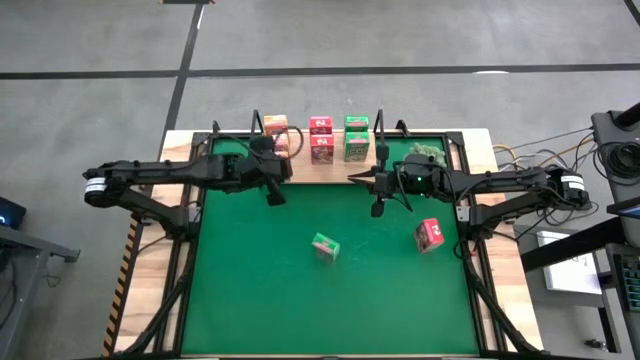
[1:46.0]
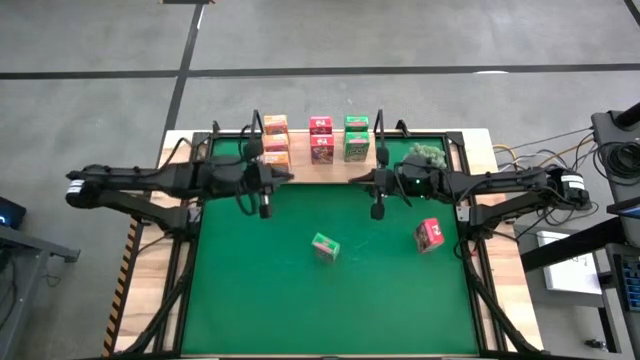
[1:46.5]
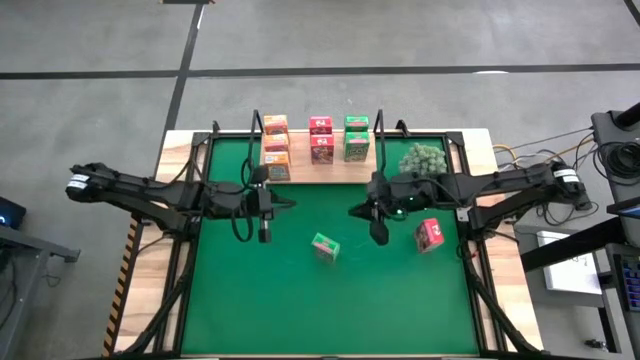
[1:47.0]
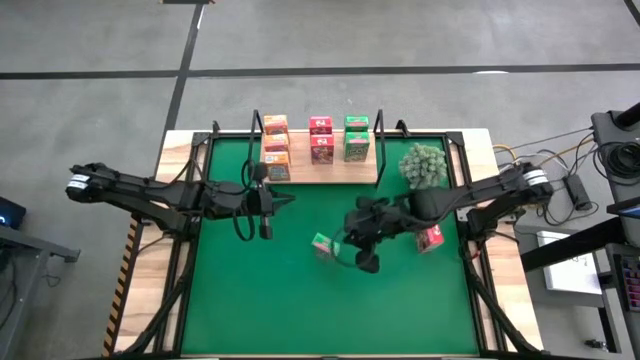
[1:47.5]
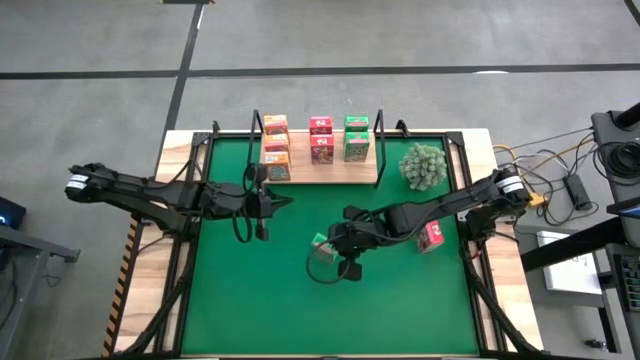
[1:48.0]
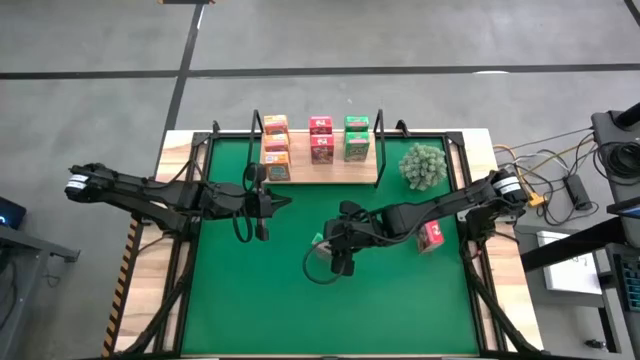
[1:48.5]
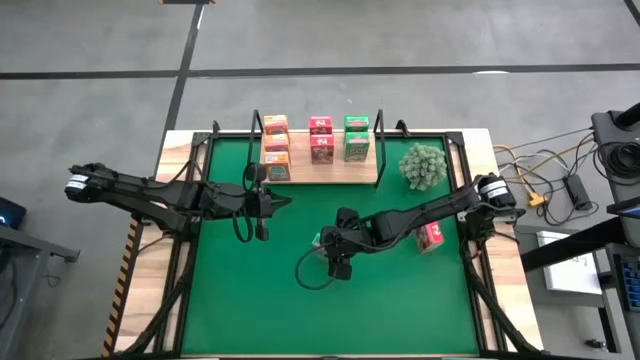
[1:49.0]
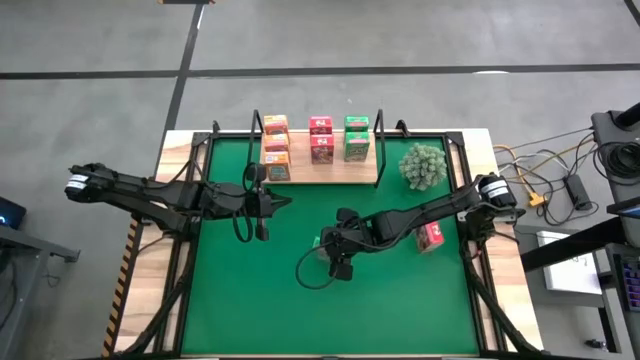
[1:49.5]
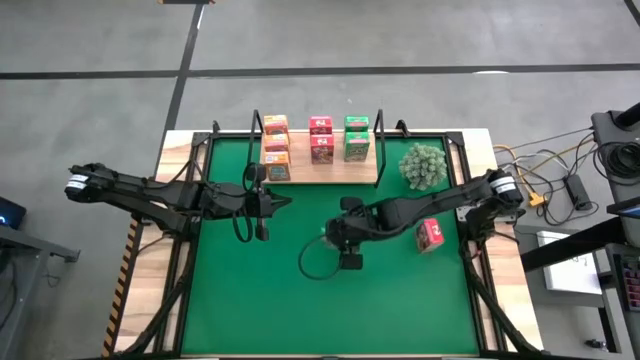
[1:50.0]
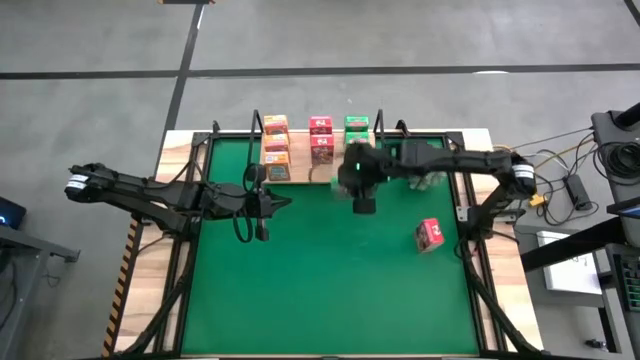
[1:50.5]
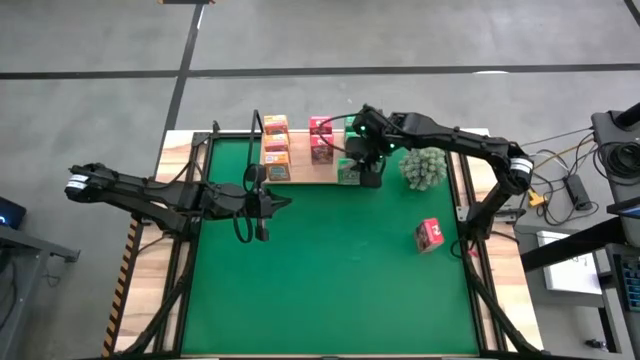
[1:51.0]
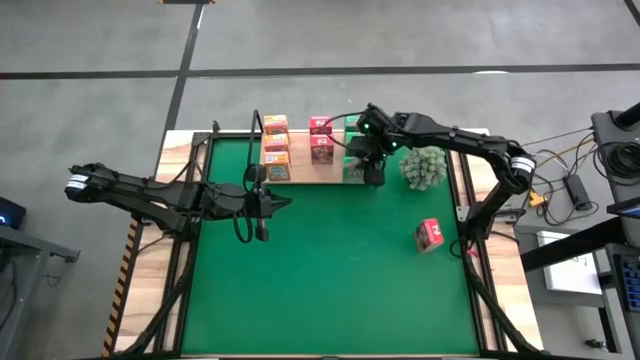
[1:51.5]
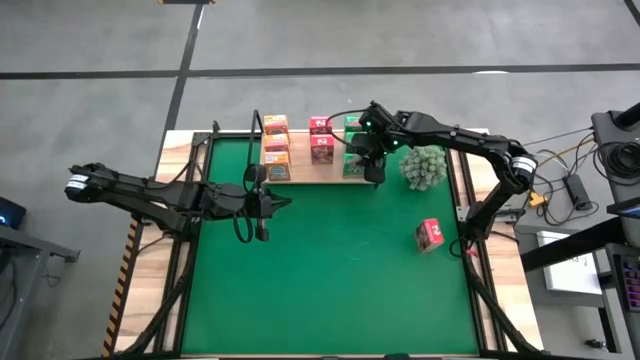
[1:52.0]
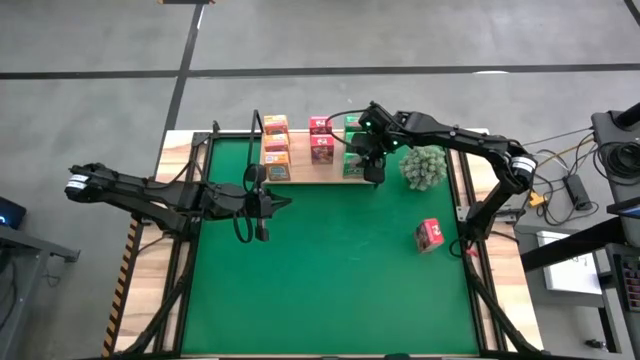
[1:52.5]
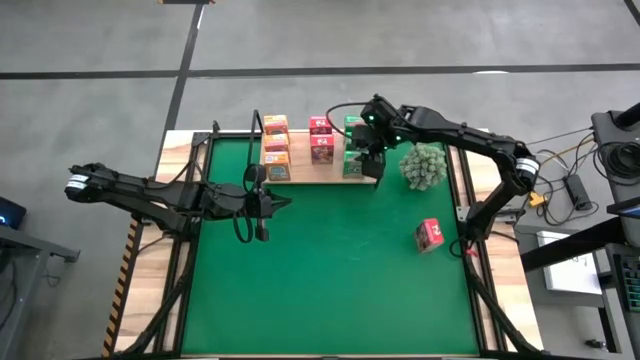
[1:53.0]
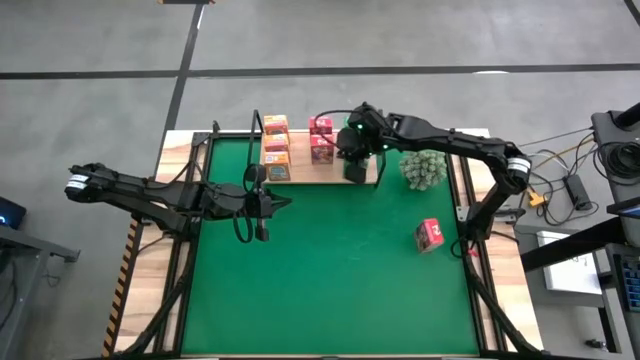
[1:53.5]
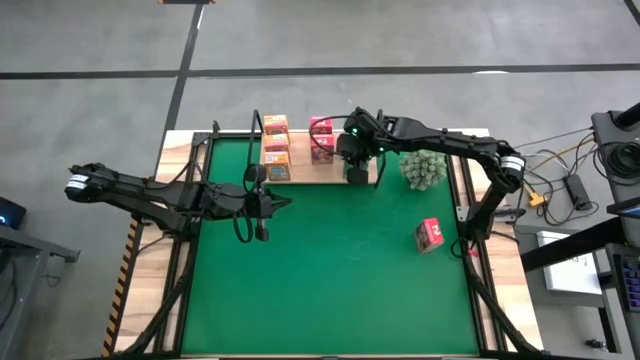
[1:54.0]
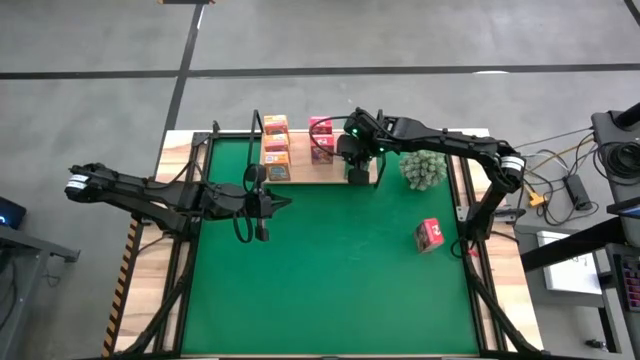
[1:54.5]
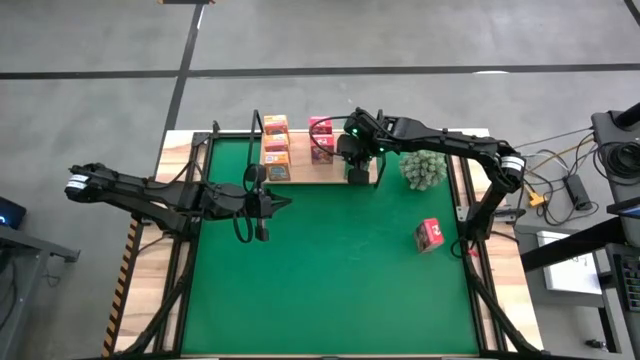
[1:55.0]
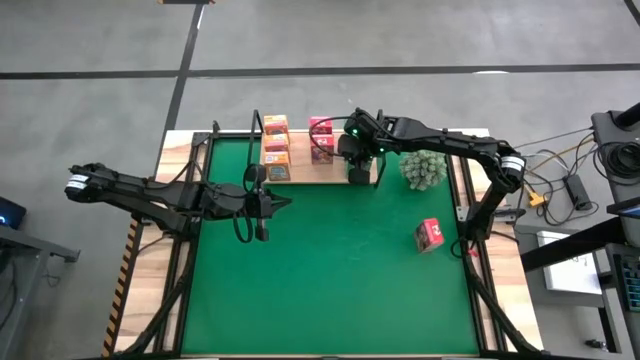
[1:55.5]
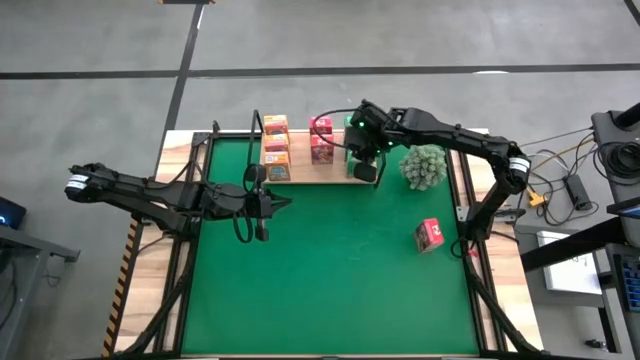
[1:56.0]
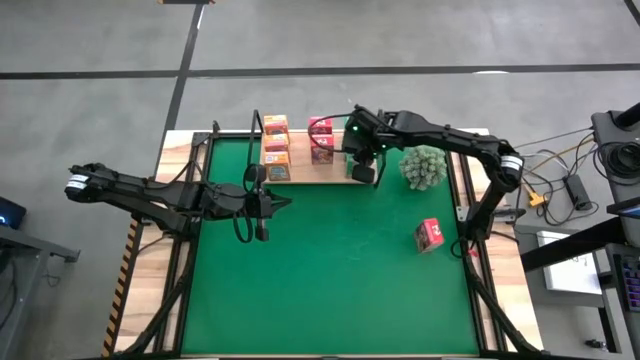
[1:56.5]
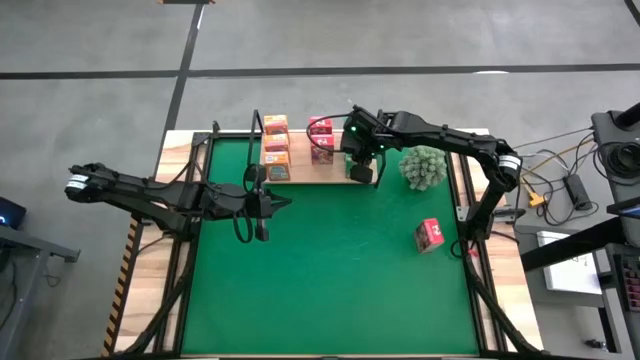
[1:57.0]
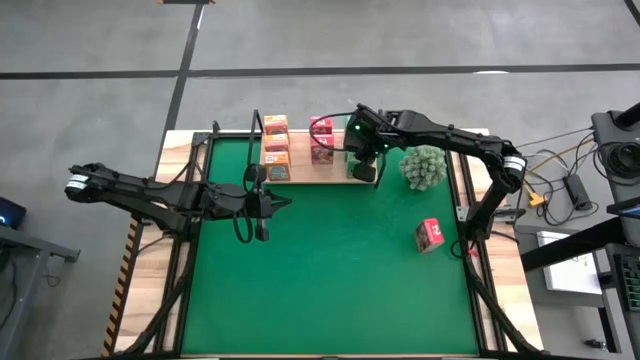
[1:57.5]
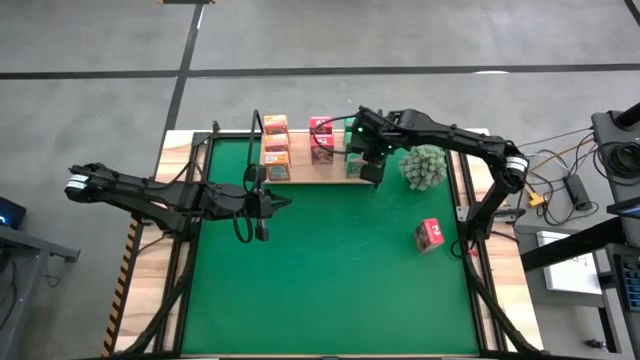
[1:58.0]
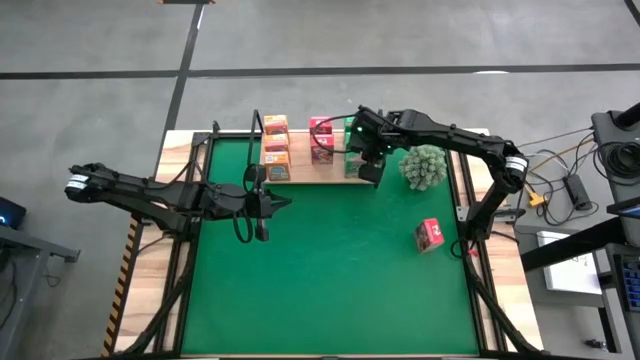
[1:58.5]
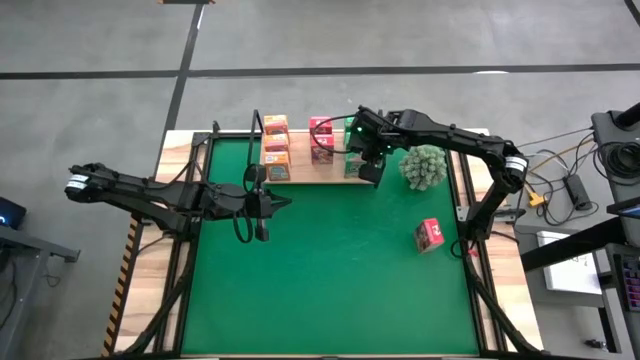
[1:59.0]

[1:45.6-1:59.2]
Task: Stack cereal on shelf
Put the green cereal box on the shelf aligned with the other green cereal boxes

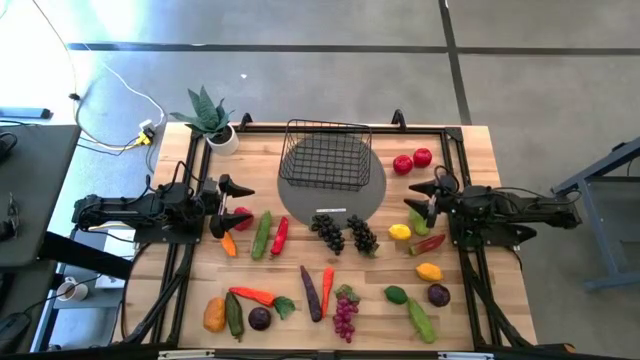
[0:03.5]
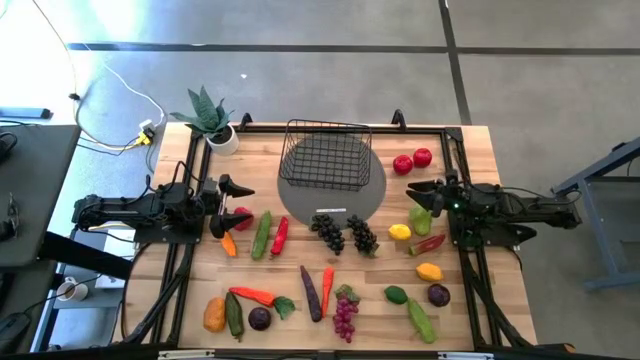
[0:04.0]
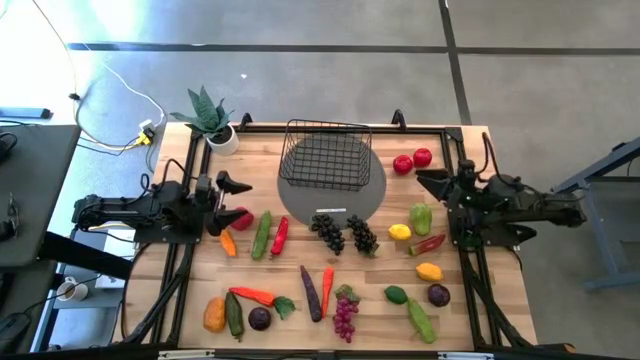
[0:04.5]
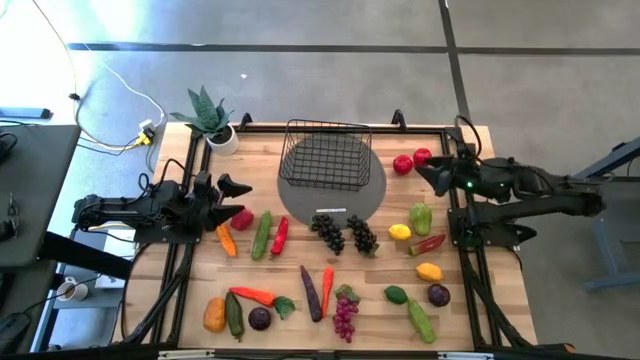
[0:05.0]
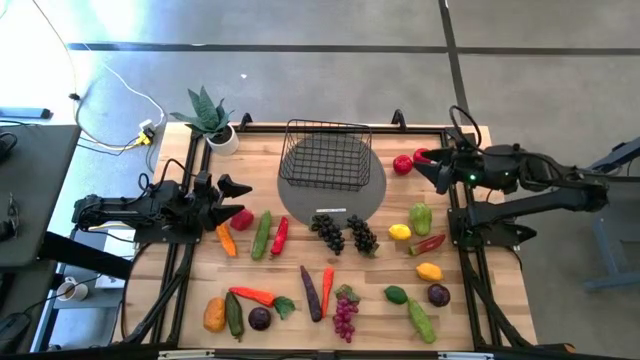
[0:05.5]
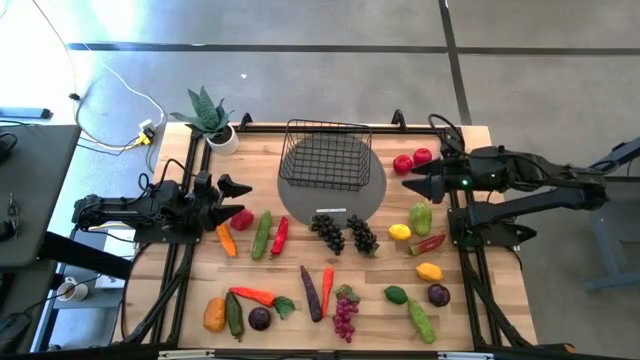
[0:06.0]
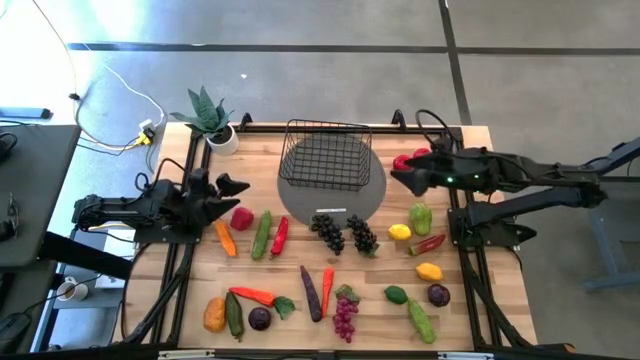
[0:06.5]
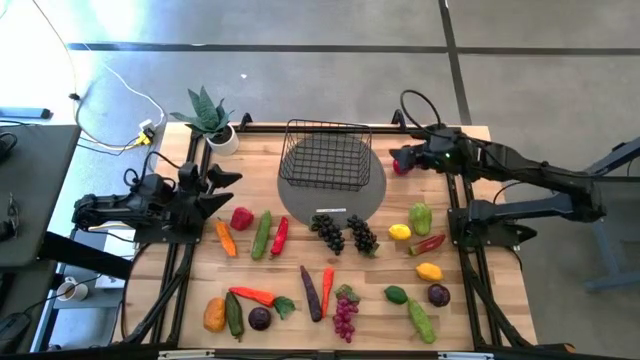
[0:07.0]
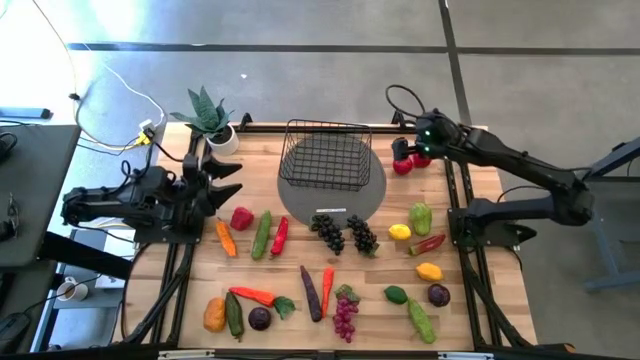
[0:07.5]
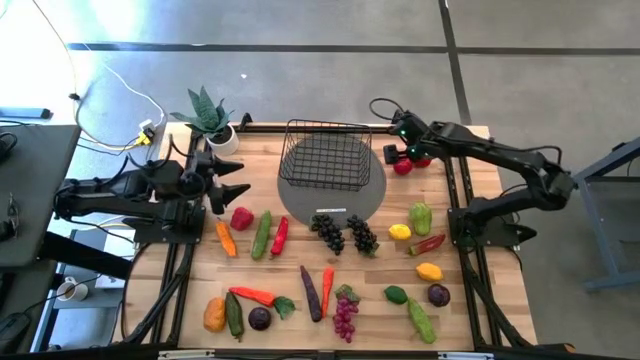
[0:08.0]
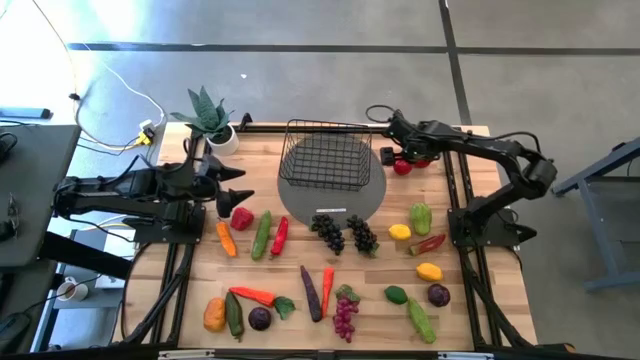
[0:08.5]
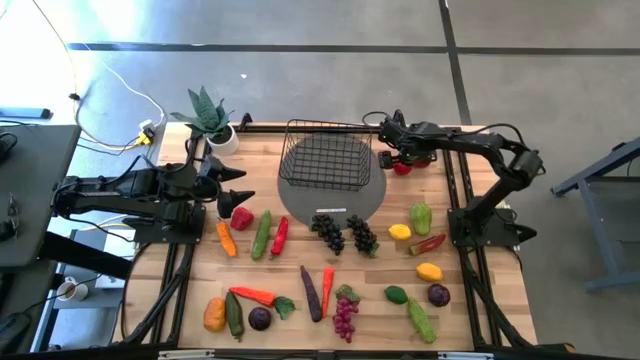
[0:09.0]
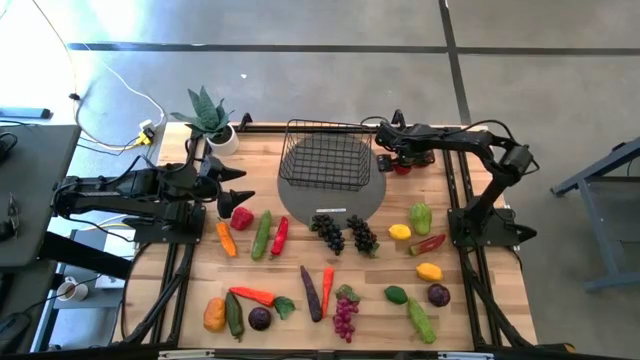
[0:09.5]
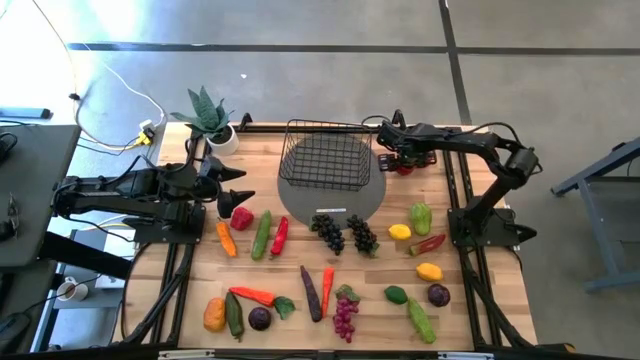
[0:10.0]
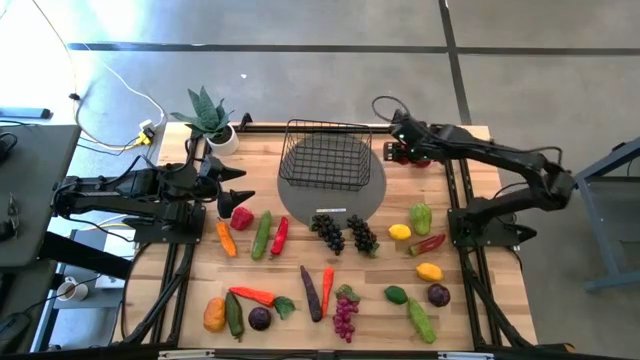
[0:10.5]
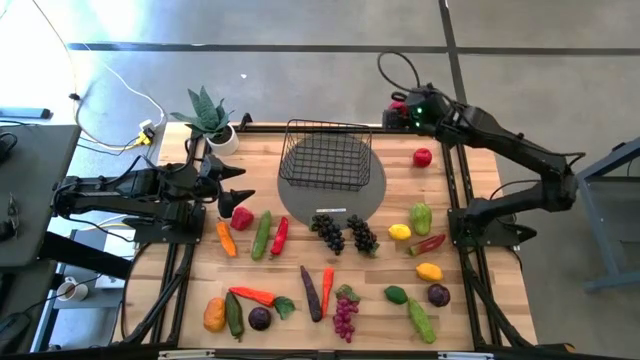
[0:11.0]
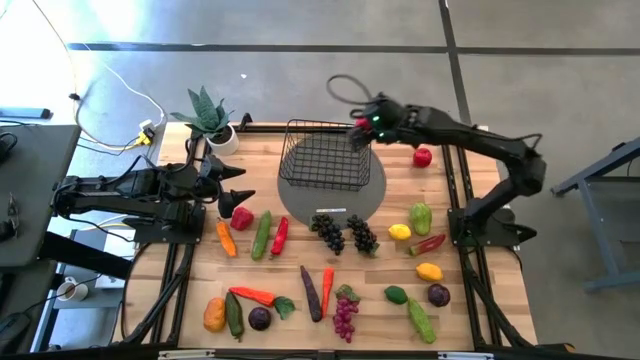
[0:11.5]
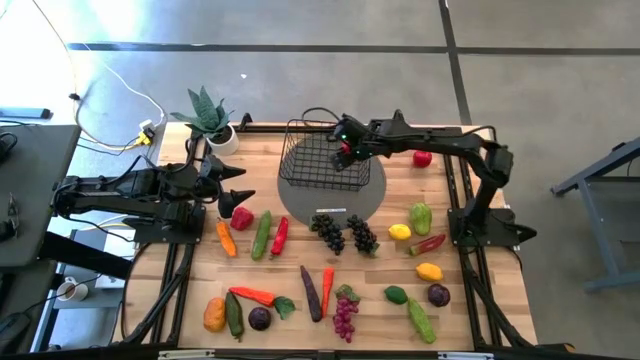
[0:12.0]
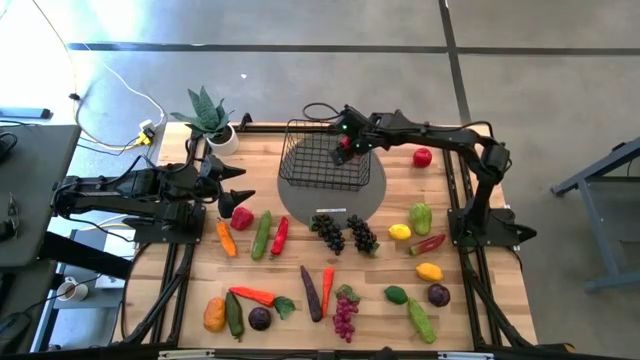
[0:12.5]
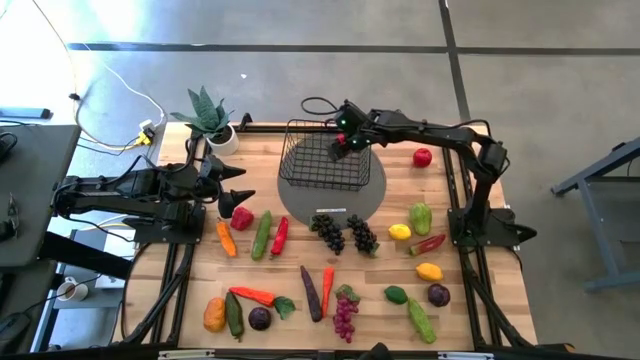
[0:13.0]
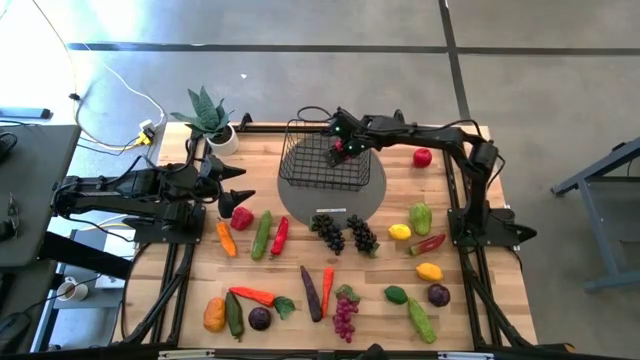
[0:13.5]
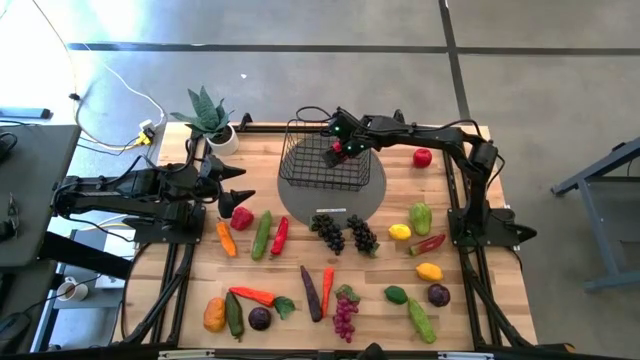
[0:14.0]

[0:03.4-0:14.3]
Task: Build produce basket
Put the red tomato into the wire basket
